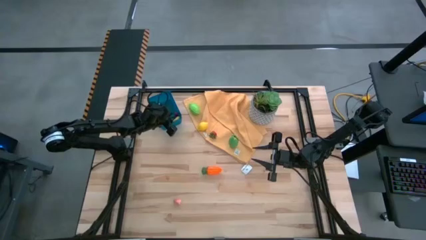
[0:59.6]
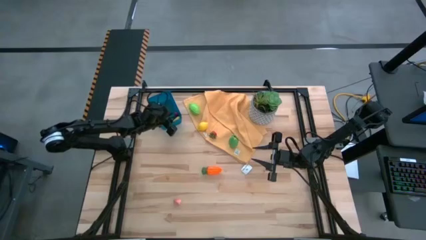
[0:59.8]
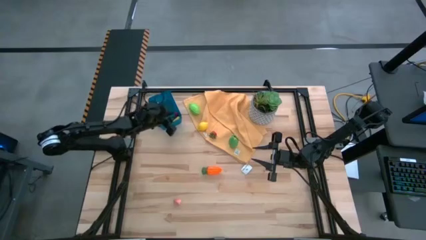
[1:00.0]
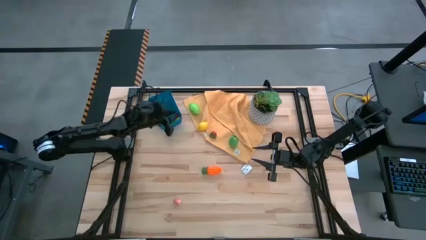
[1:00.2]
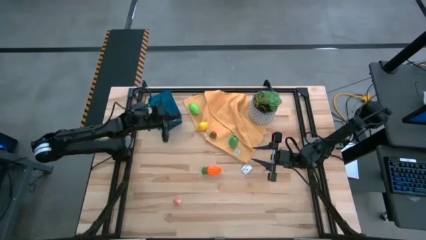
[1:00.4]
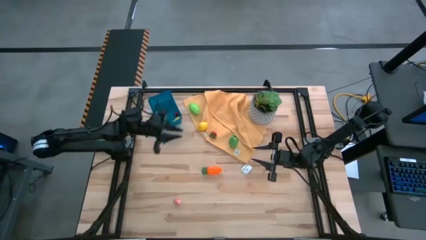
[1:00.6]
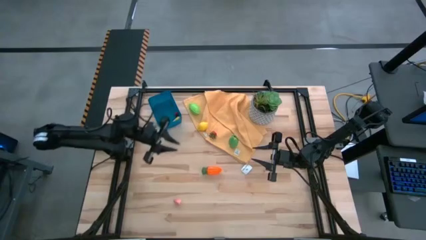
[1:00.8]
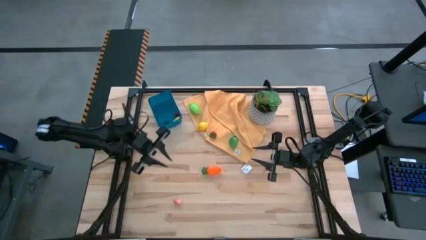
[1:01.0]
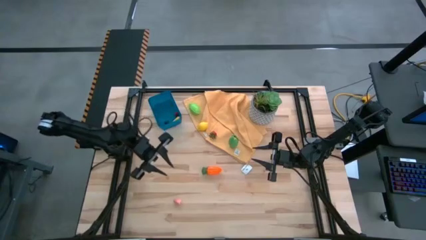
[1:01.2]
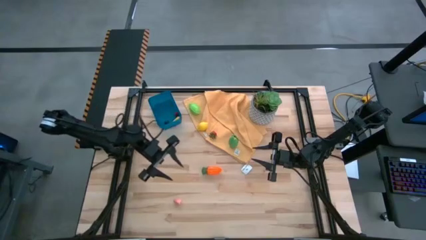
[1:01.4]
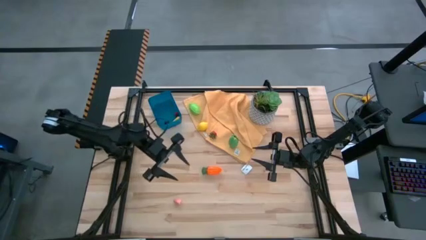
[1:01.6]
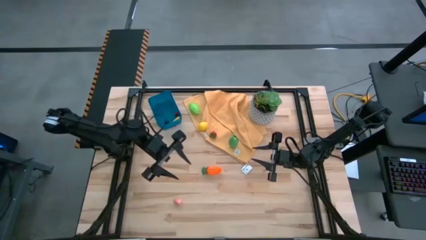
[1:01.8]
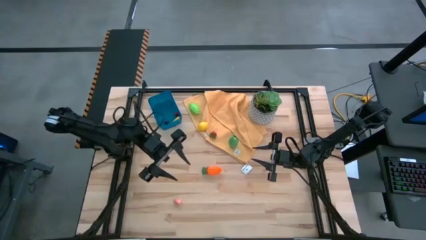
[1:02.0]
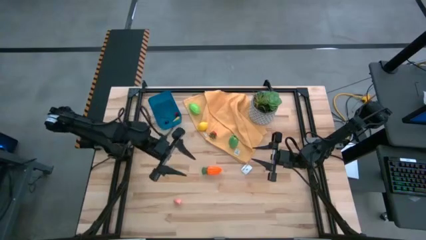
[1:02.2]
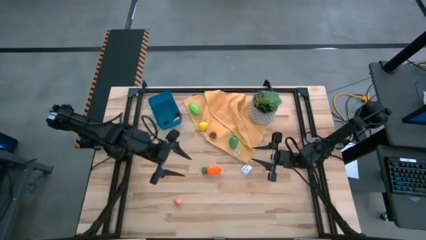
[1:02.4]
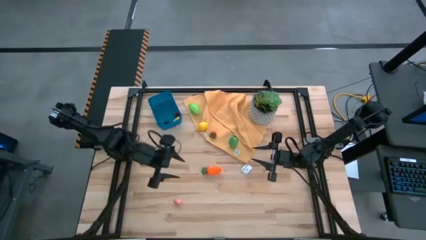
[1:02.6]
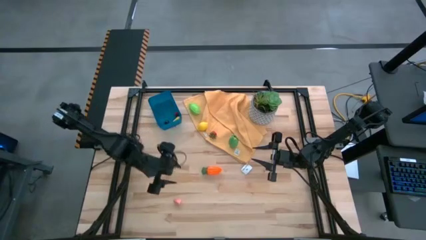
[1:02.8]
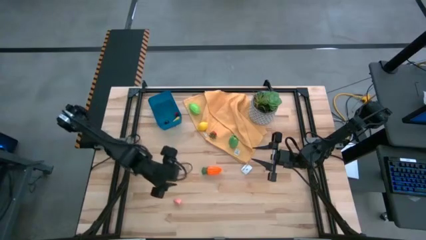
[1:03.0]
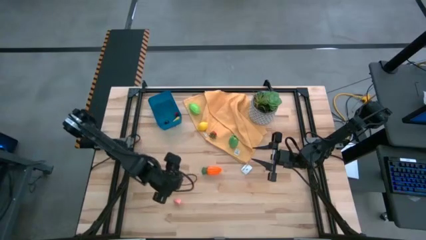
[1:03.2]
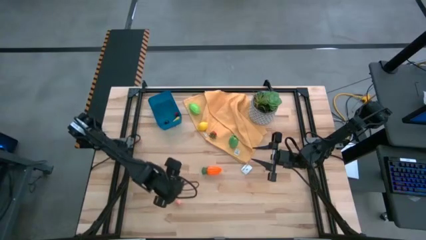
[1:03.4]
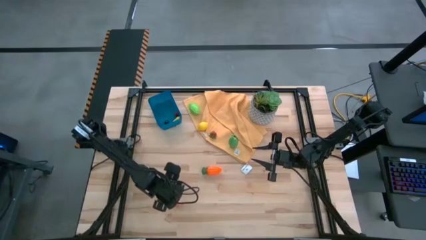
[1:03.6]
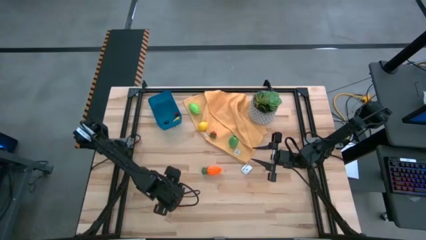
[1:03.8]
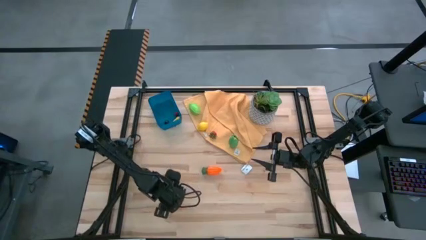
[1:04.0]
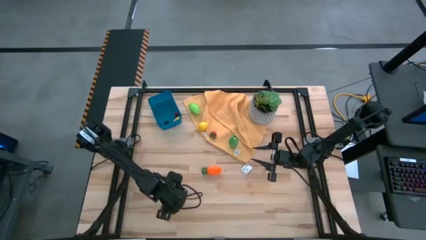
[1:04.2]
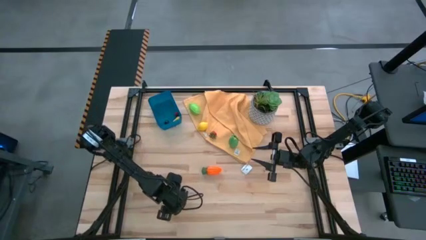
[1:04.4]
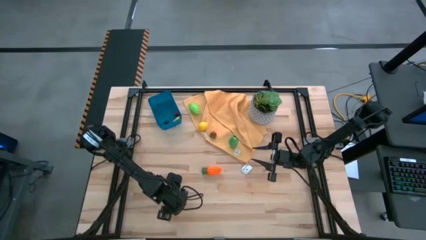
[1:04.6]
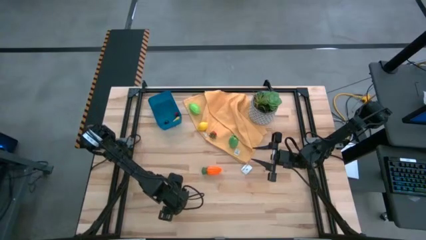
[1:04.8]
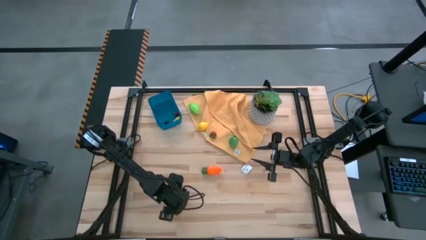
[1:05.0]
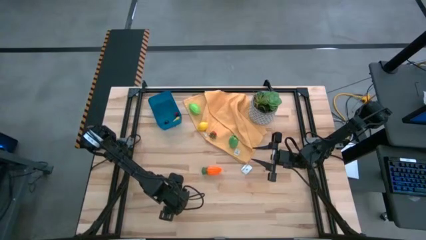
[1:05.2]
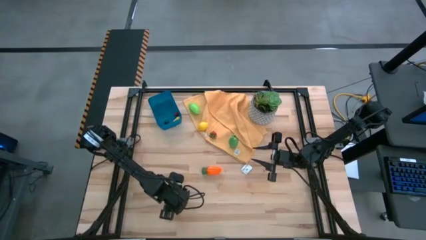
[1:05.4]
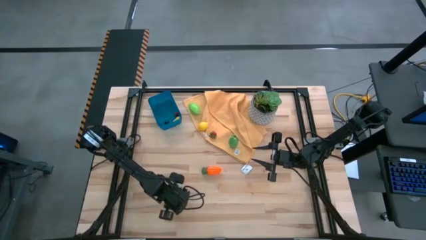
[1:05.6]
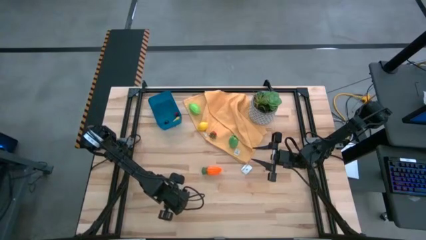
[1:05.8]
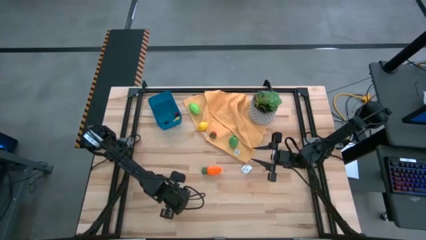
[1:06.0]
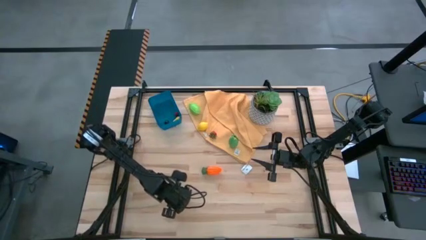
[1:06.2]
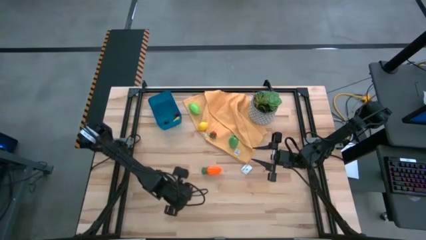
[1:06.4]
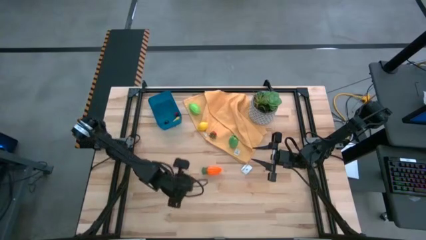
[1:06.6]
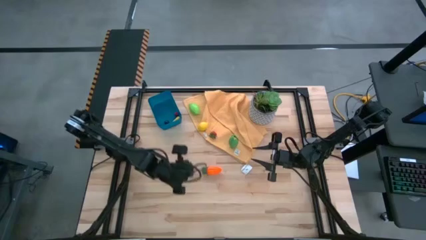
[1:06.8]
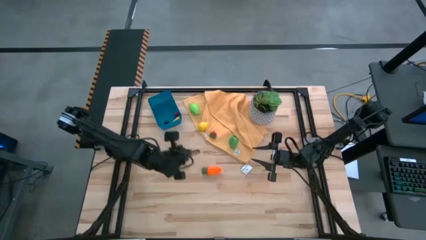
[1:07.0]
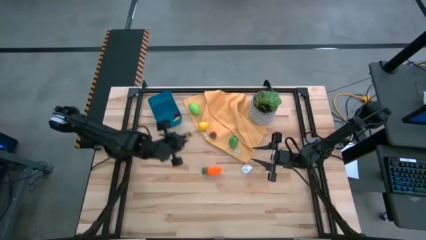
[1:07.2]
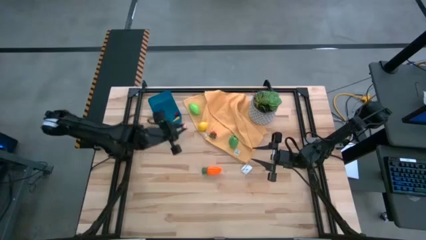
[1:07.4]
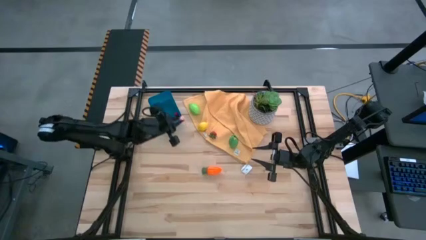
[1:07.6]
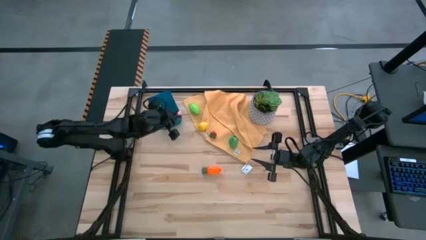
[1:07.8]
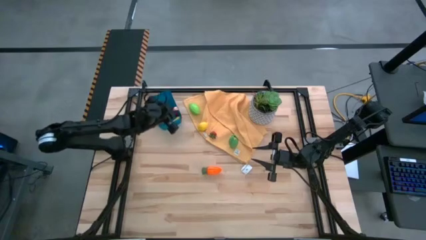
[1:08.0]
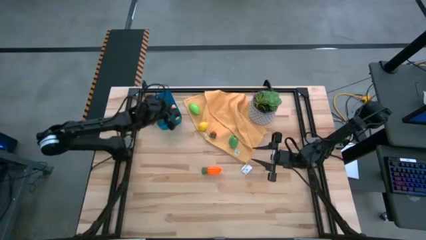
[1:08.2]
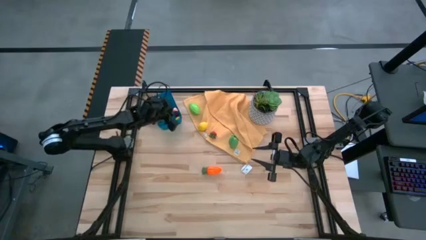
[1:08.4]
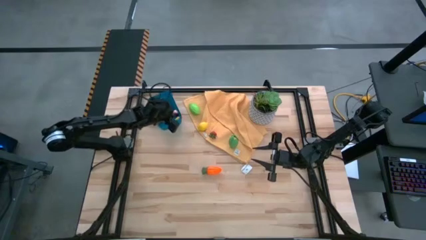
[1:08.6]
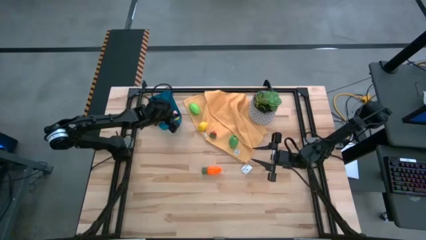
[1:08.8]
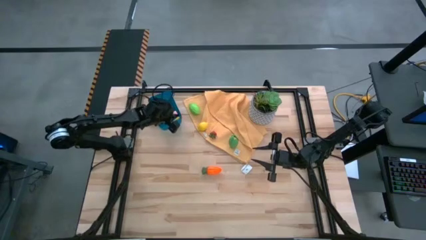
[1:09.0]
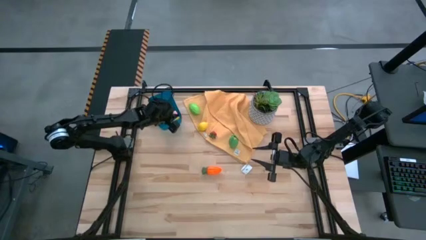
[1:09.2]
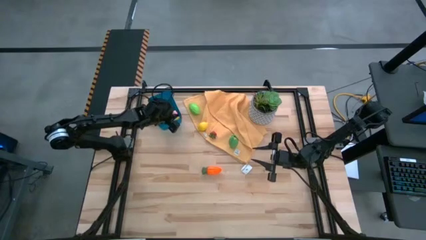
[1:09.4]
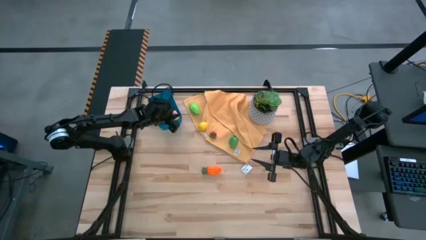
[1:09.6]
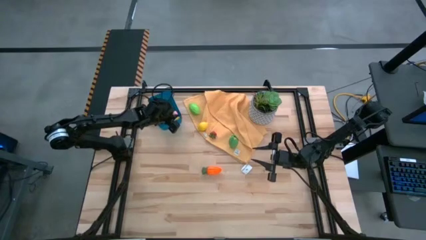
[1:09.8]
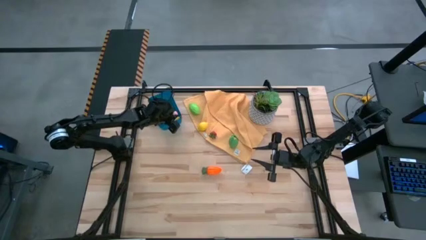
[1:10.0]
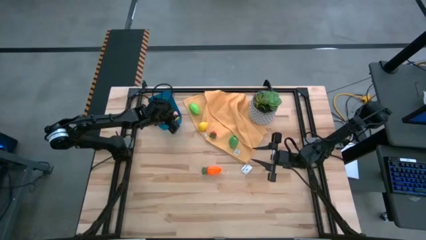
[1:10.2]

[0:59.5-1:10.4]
Task: Pick and placing Produce into tupperware
Put the peach into the blue bin

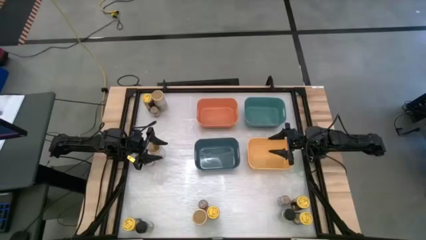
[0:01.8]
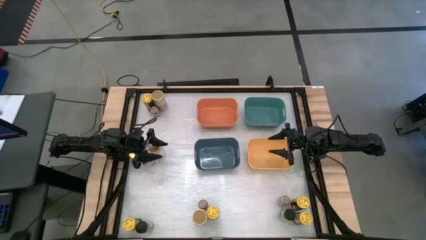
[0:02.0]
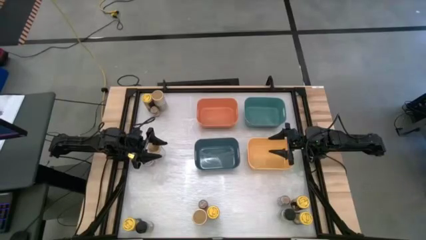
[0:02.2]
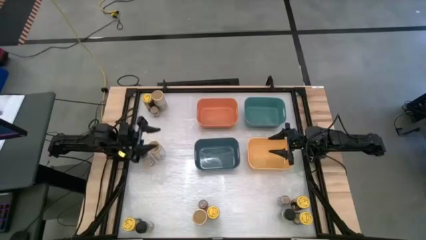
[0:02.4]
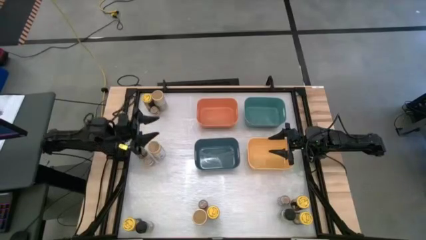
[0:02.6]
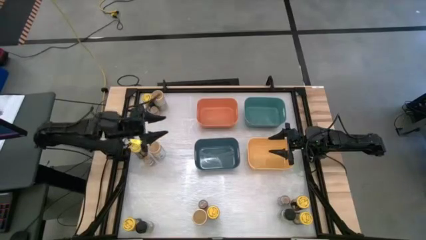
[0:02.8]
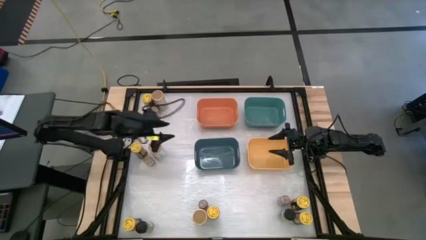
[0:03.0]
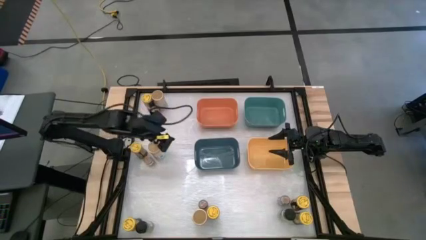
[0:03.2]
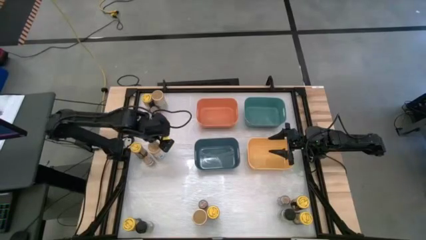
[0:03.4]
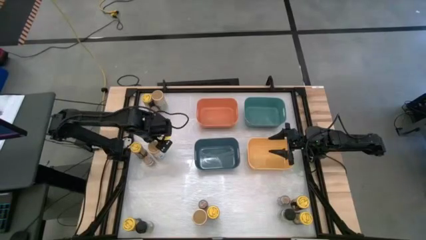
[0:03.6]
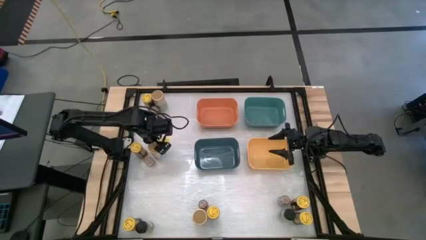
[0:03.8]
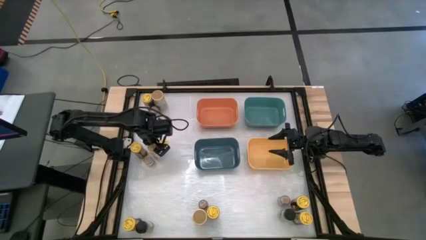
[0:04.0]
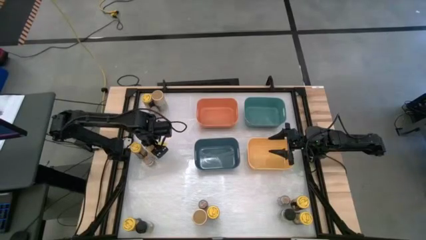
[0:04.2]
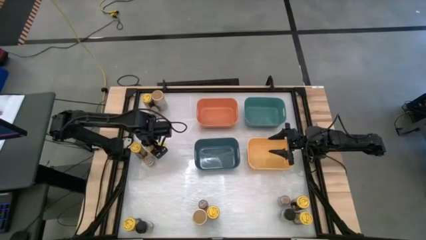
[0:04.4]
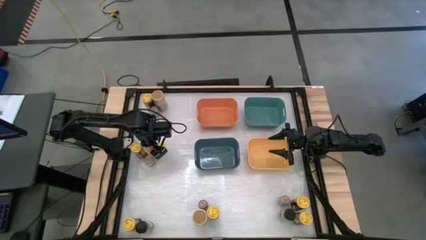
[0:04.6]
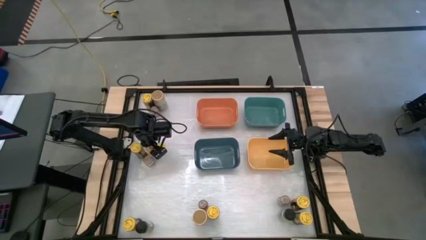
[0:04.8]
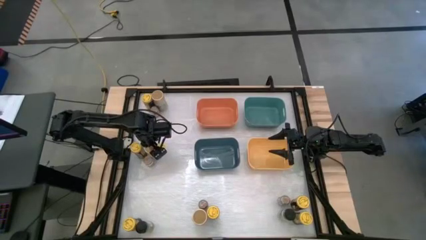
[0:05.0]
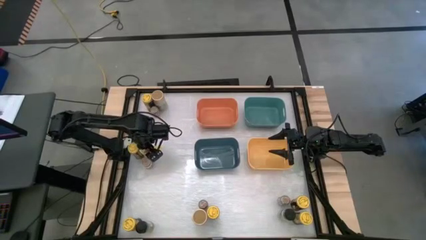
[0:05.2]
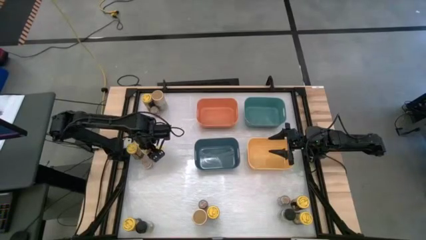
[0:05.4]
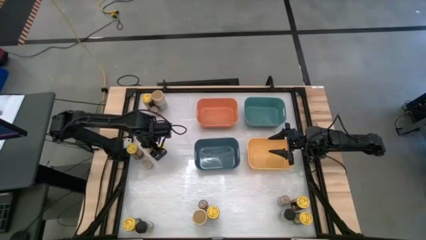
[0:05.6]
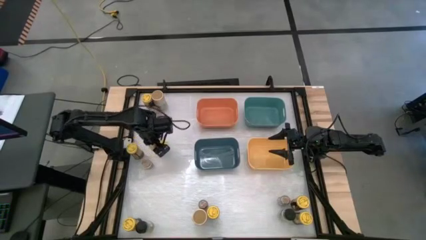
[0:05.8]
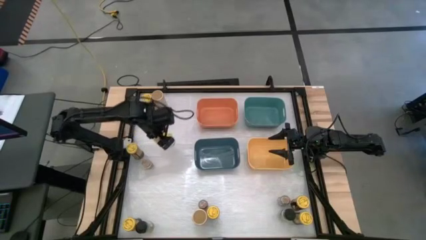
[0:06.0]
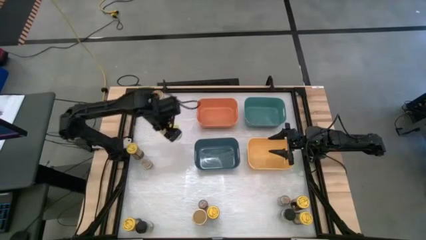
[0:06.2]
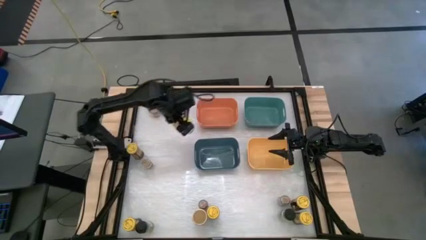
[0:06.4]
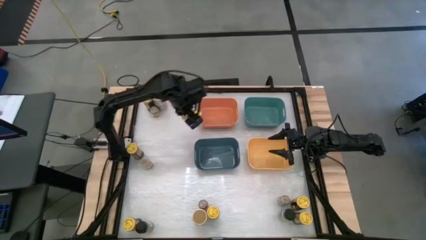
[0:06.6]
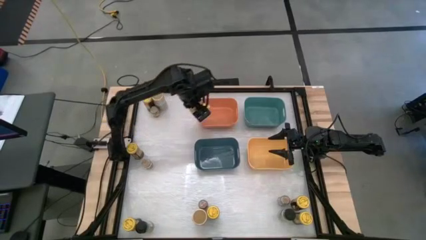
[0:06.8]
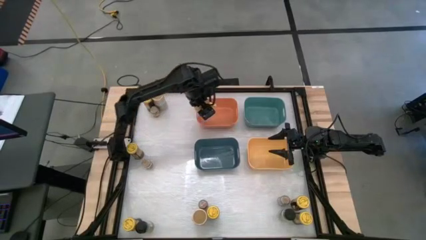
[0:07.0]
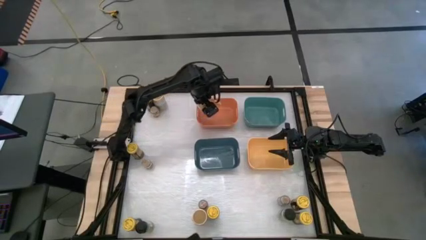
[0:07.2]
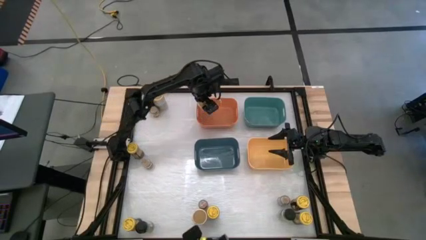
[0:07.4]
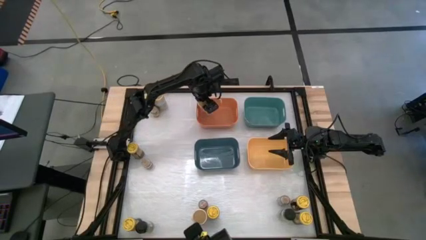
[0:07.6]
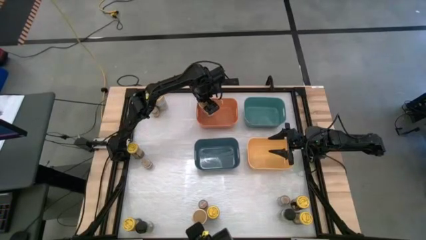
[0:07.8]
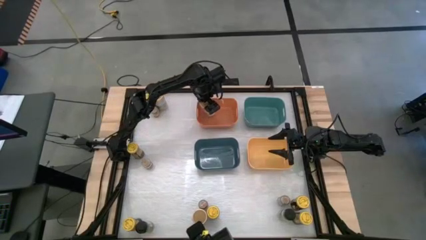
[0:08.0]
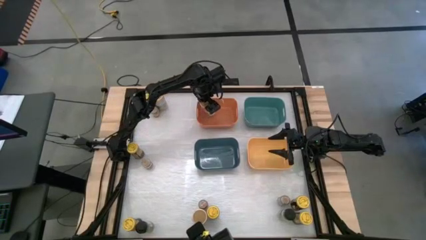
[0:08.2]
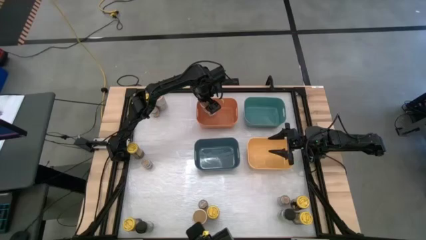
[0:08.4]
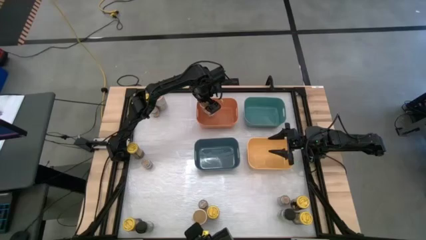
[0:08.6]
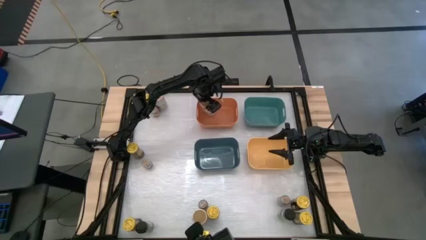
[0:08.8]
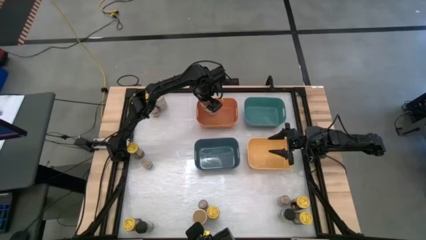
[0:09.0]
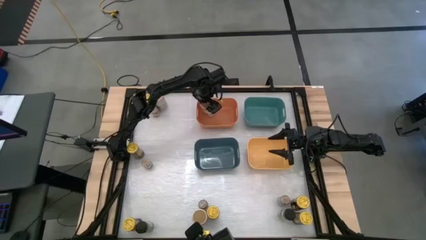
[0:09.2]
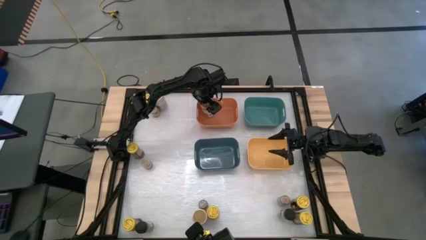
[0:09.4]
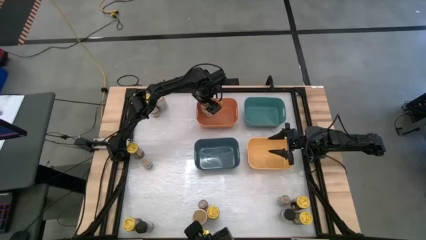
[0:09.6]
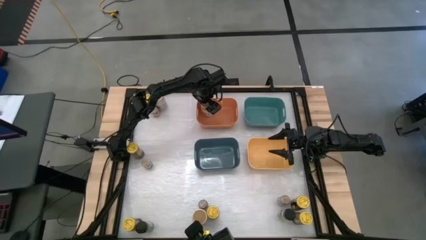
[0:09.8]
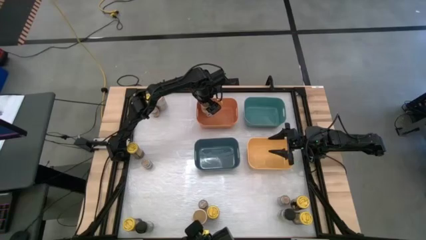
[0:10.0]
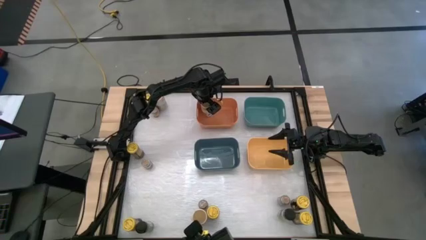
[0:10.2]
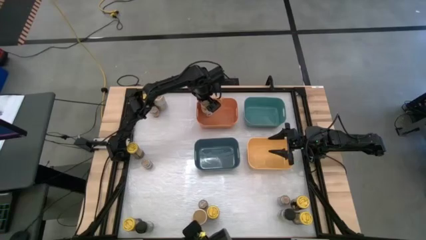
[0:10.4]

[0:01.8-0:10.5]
Task: Sort spices by type
Put the gold spice bottle into the orange bin
